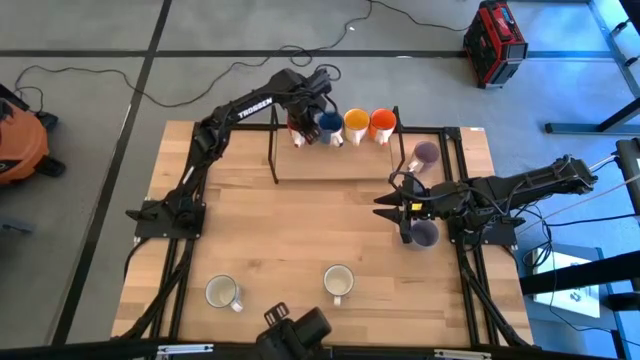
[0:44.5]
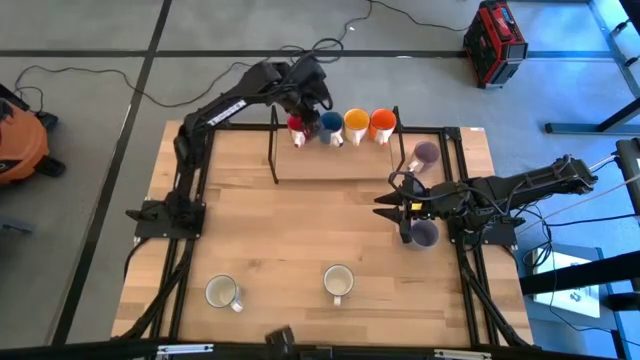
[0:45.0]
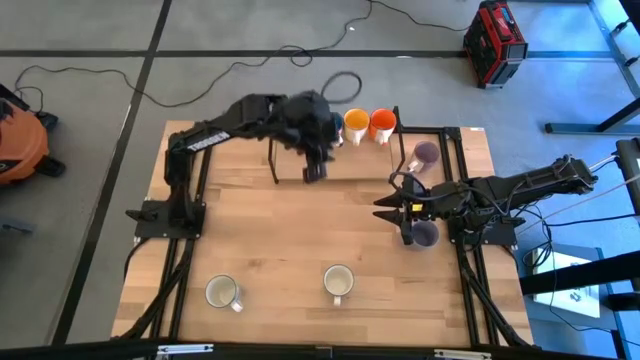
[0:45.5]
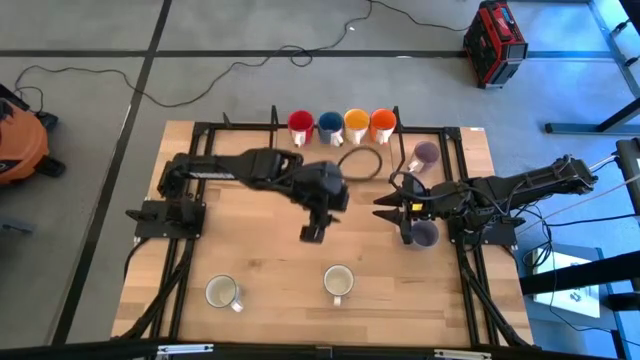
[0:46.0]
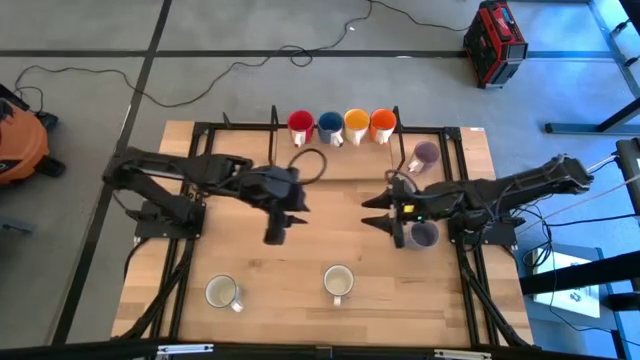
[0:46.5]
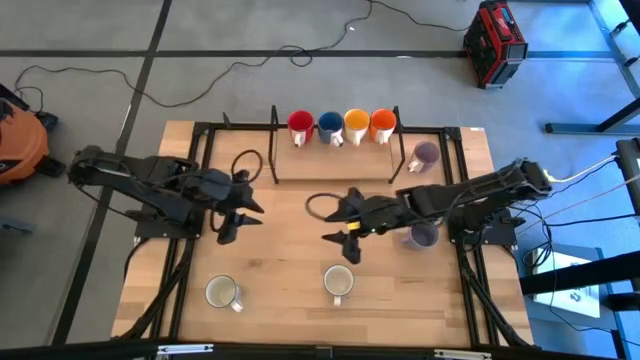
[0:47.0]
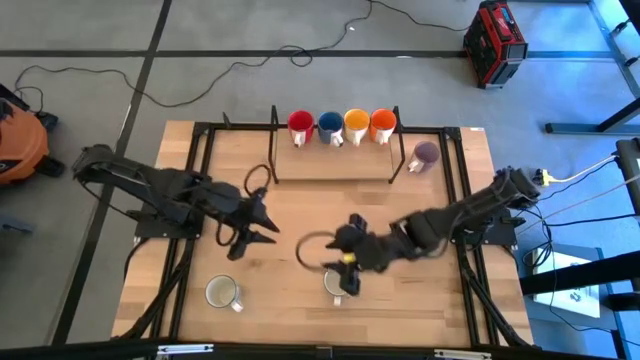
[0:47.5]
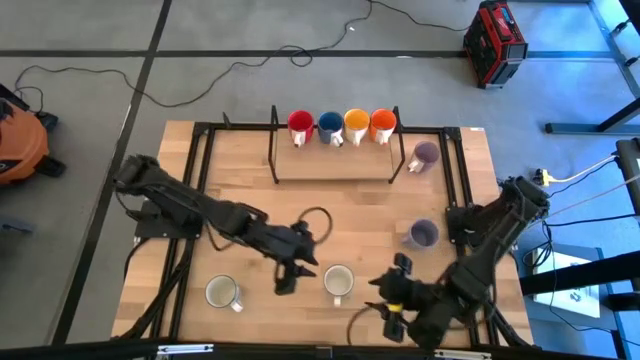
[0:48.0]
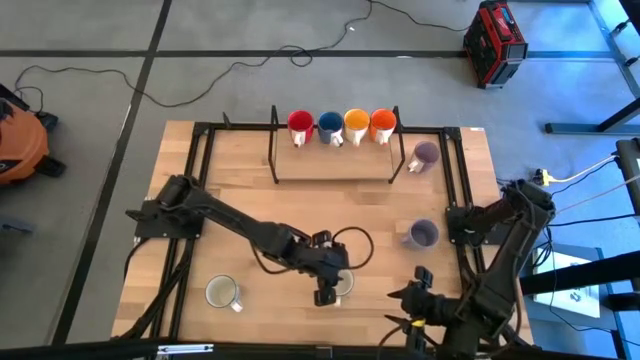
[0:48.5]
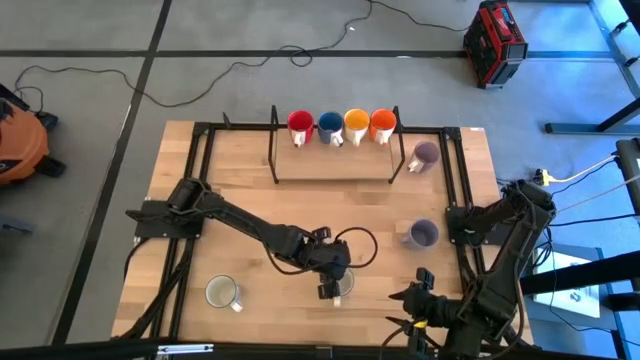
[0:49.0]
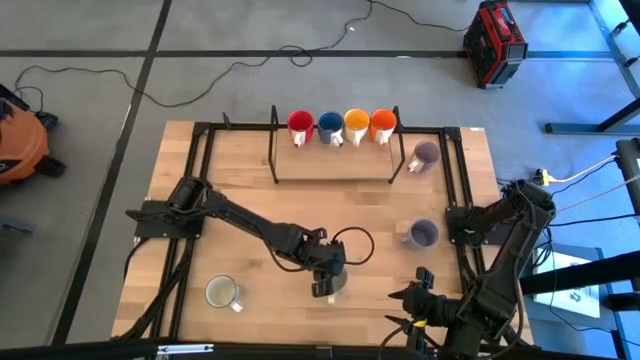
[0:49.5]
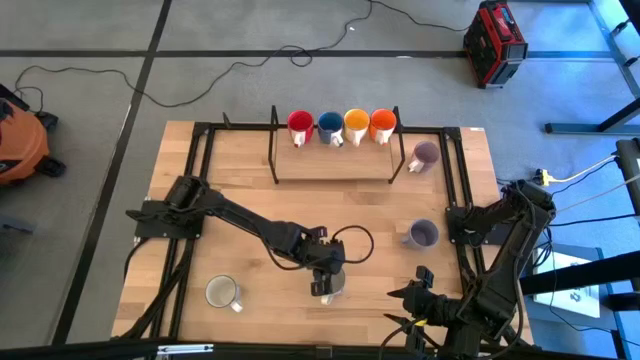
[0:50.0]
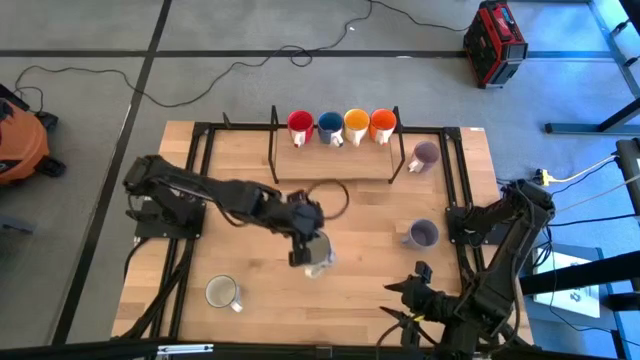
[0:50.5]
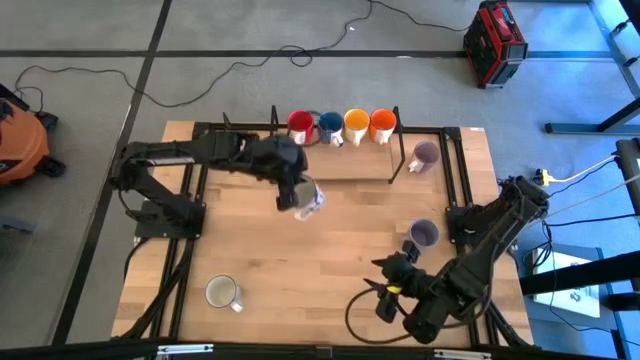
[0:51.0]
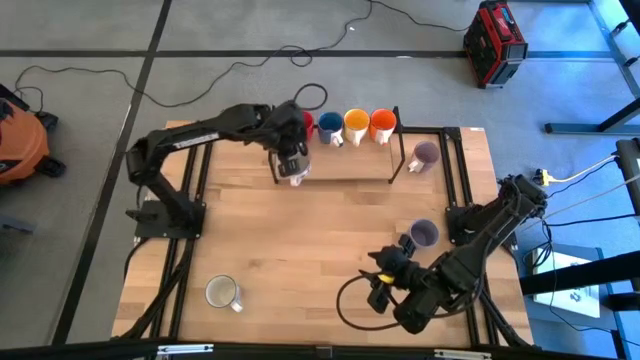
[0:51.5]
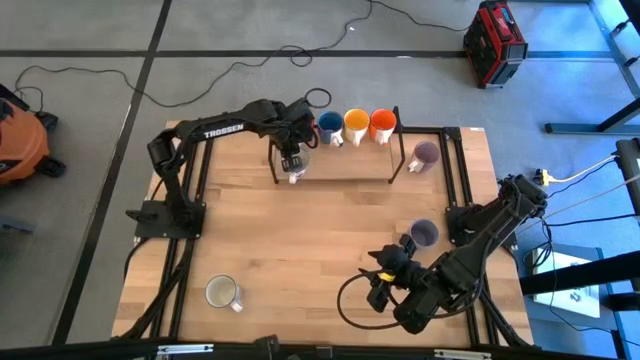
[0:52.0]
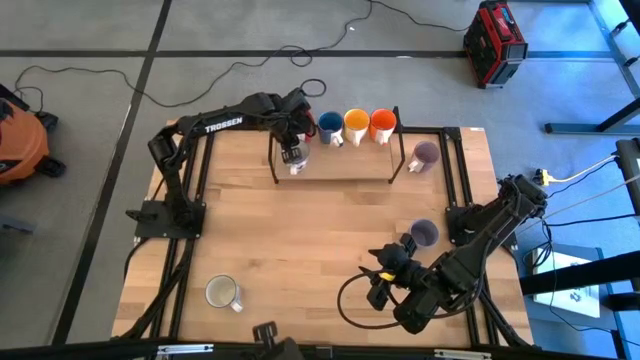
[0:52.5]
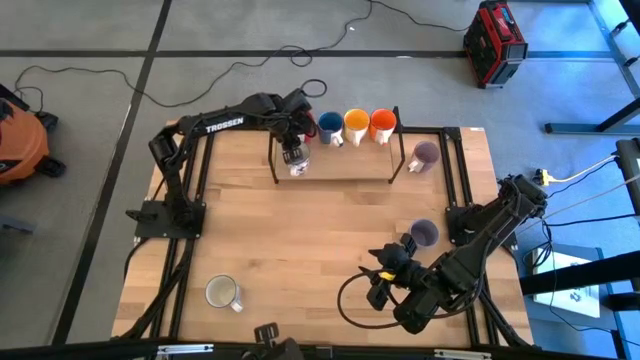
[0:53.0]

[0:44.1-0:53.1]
Task: Place coffee mugs
Put the right white mug on the shelf aligned with the red mug

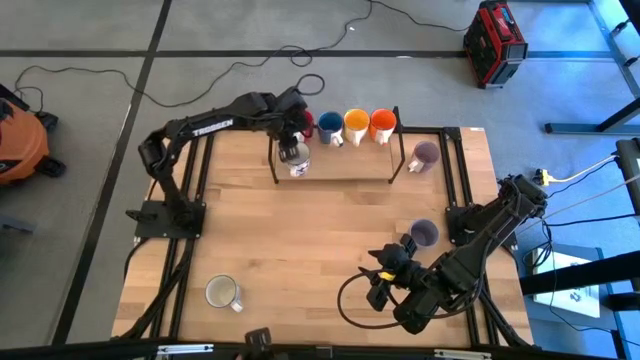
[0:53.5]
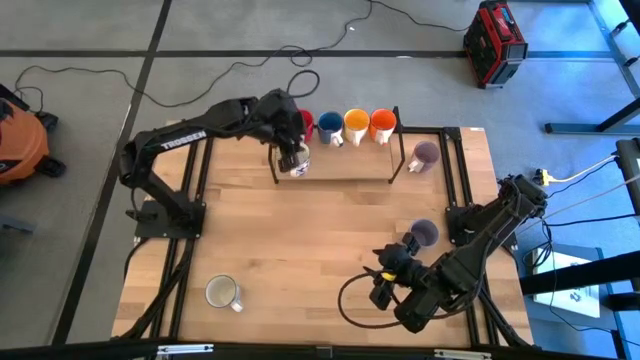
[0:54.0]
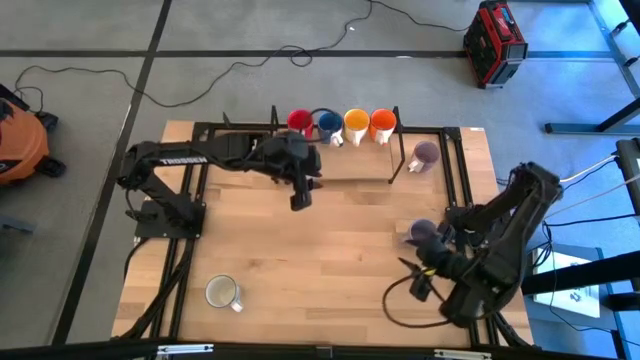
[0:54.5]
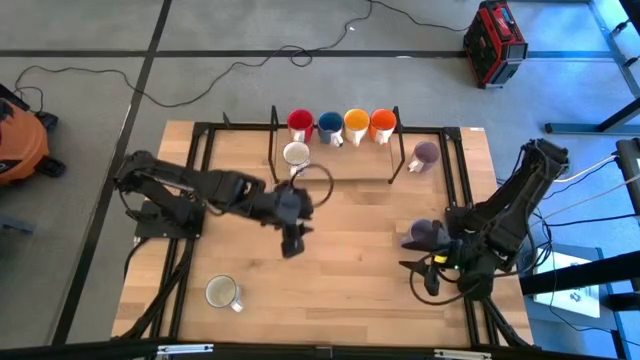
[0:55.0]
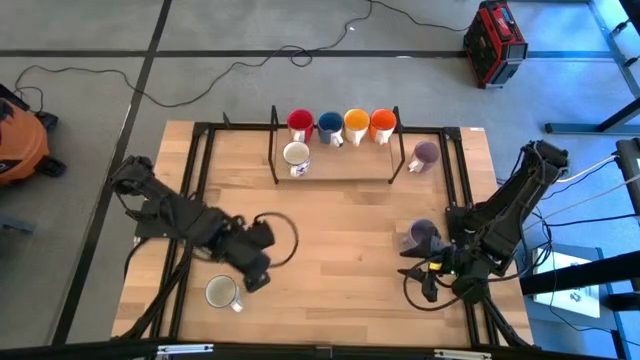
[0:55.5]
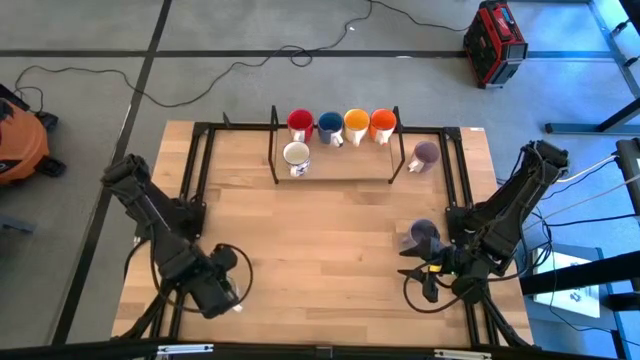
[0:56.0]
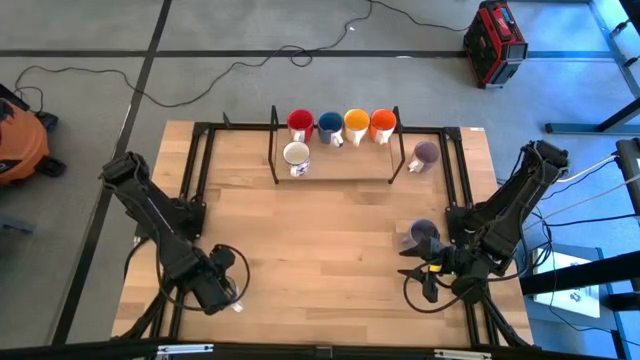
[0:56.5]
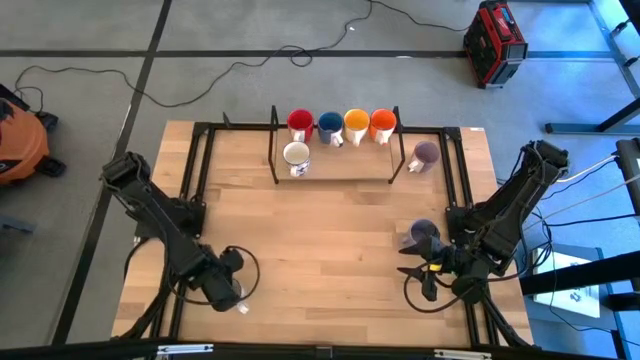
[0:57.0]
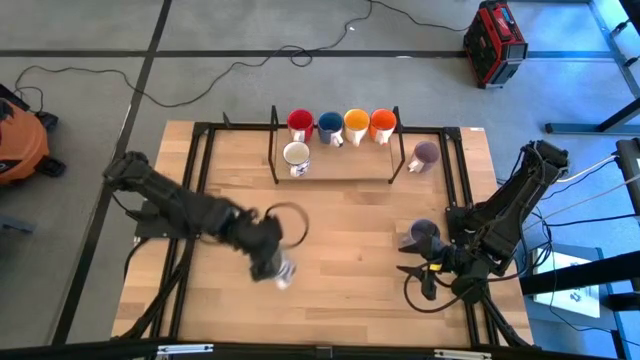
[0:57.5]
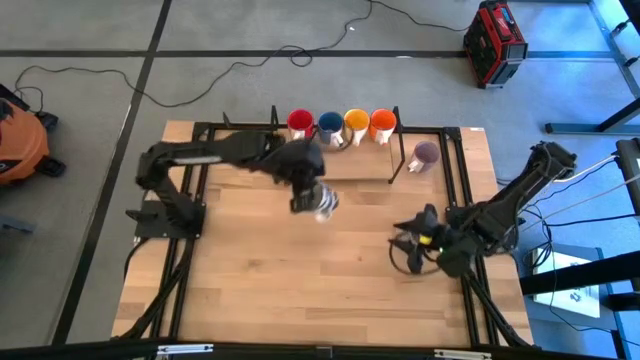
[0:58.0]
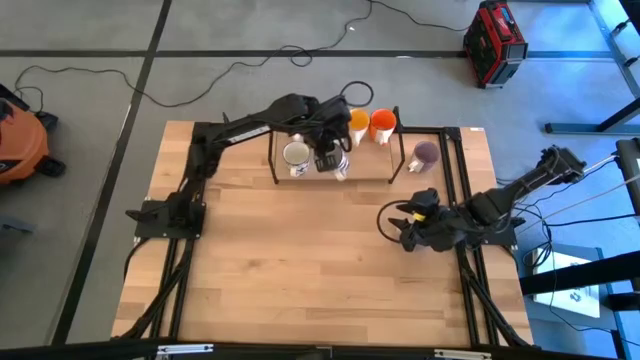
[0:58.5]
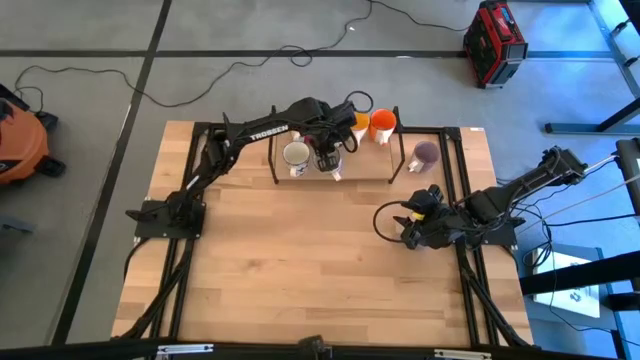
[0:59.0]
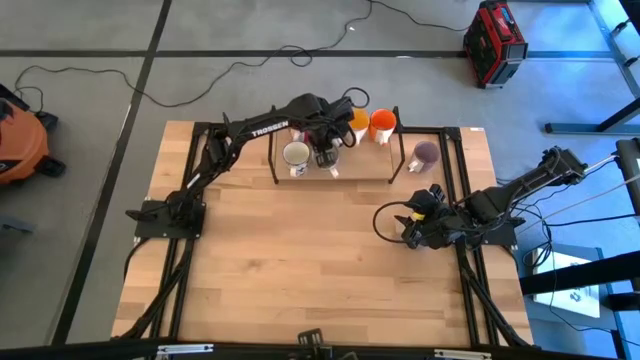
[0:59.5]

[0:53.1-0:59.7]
Put the white mug on the shelf aligned with the blue mug

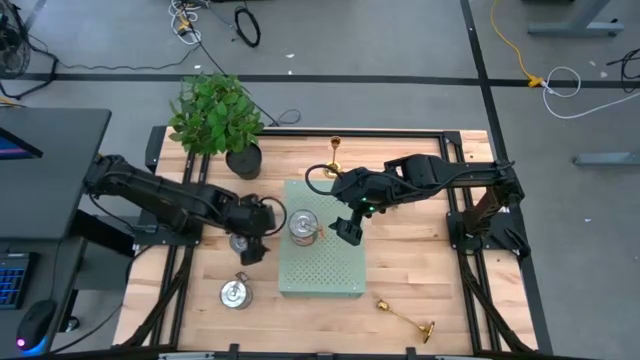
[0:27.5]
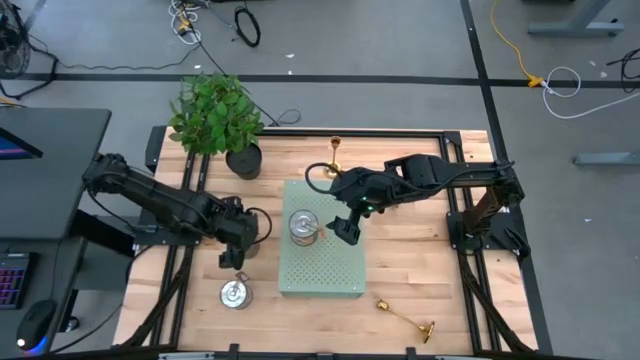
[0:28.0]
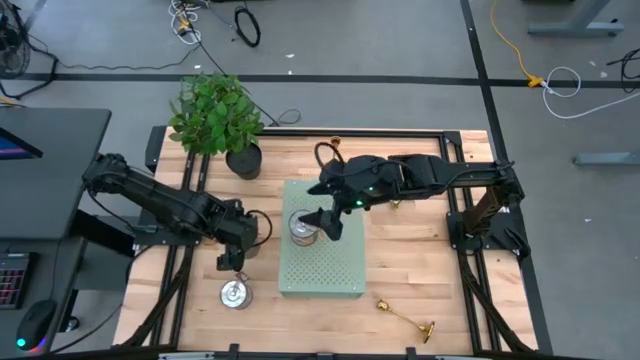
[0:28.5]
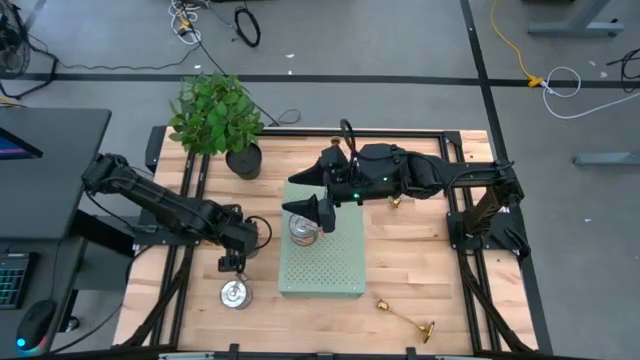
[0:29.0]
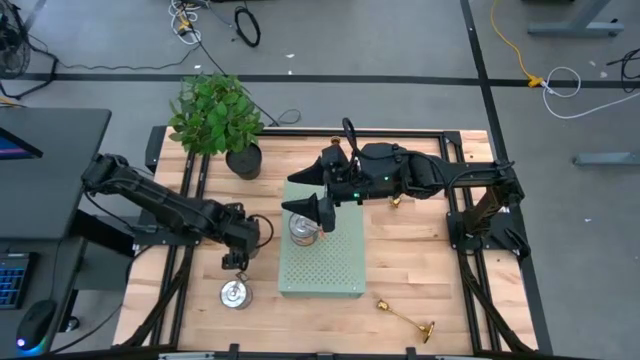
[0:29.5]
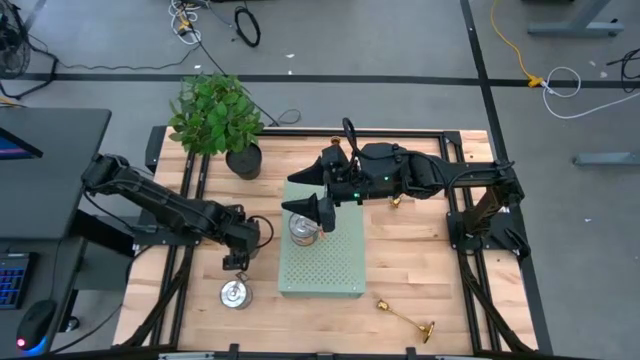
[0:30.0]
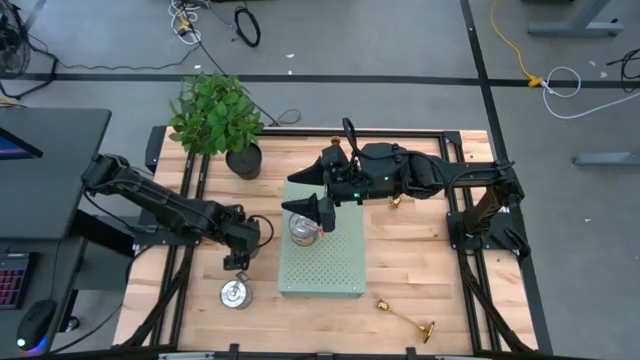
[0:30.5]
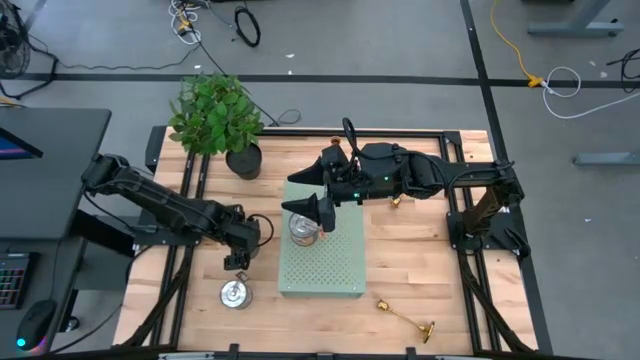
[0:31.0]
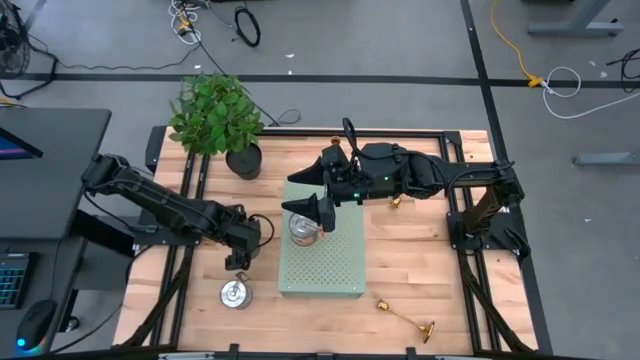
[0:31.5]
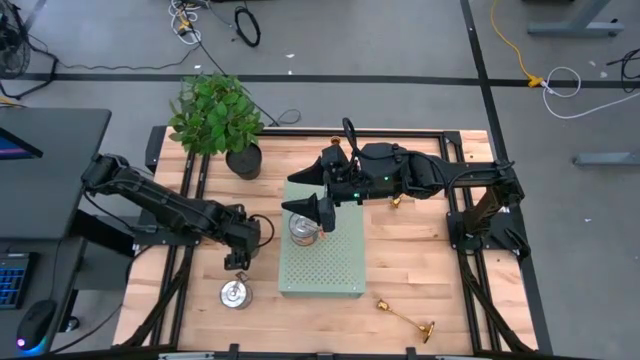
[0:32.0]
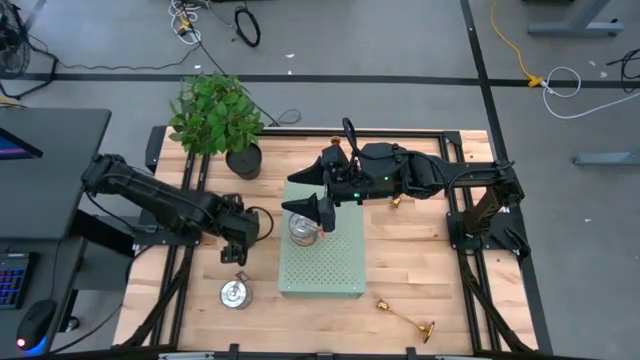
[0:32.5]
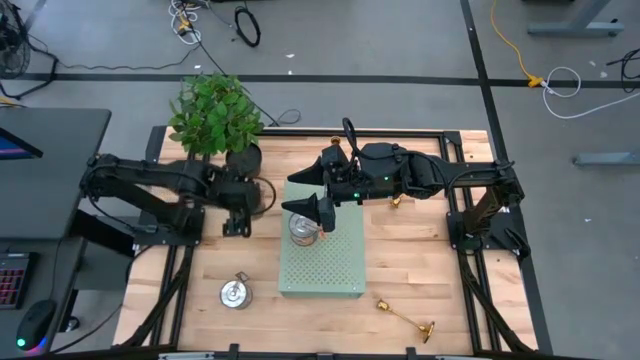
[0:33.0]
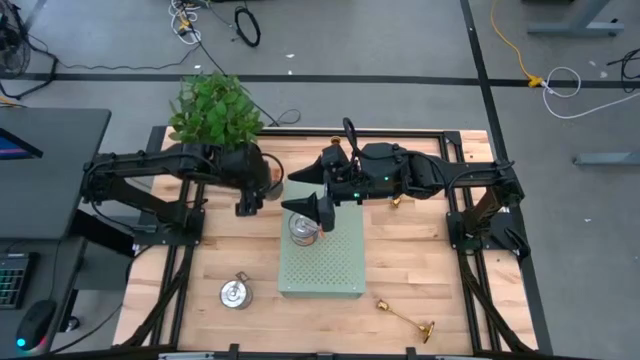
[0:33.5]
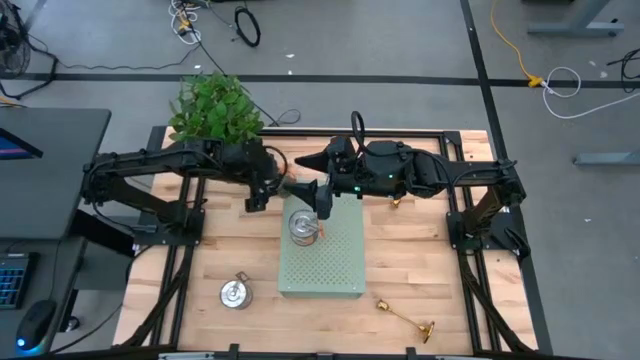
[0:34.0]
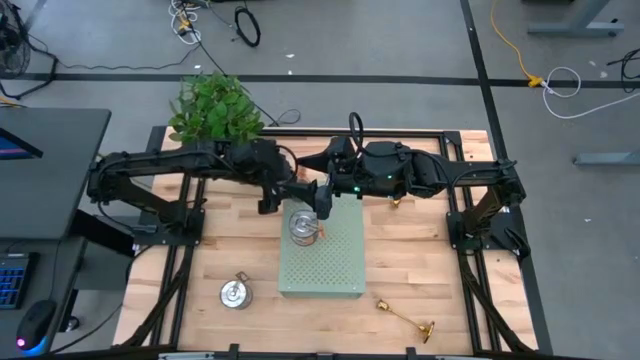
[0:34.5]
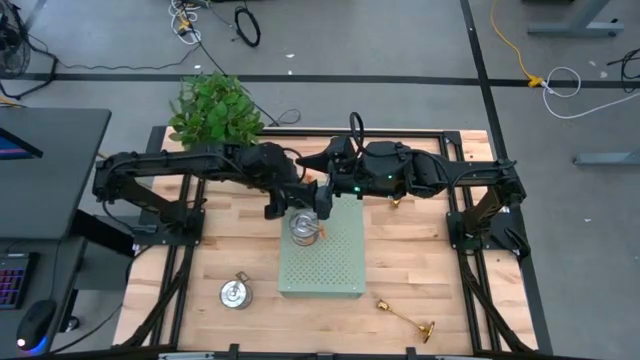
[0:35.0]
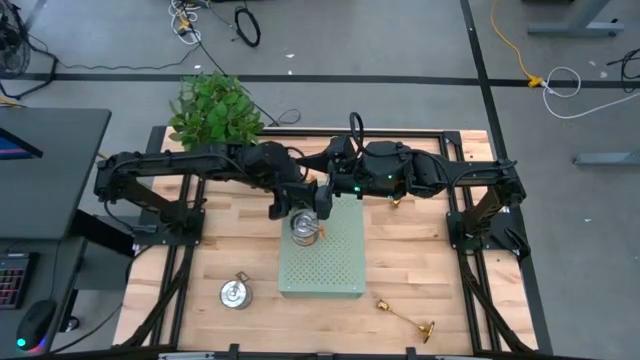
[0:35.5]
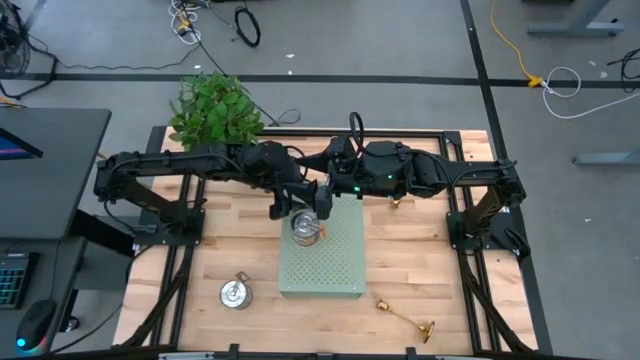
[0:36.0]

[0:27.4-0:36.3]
Task: Pick & Place candle stick holders
Put the top orange scented candle on the shelf
